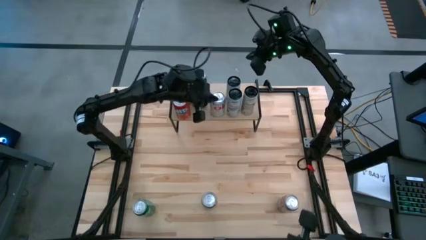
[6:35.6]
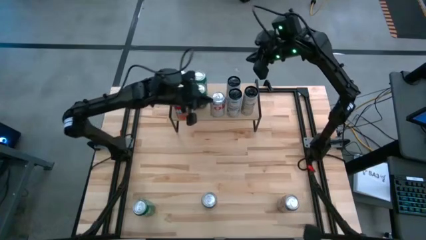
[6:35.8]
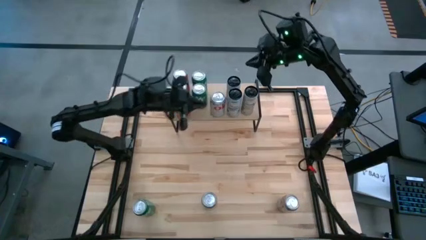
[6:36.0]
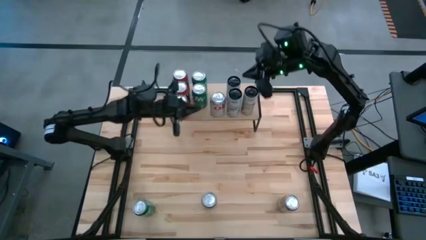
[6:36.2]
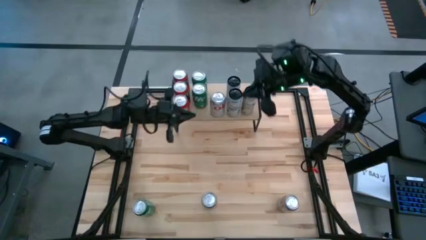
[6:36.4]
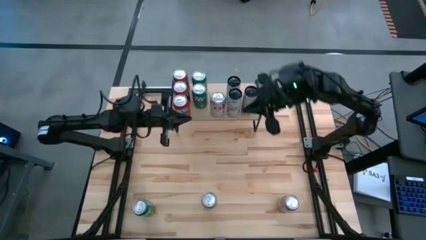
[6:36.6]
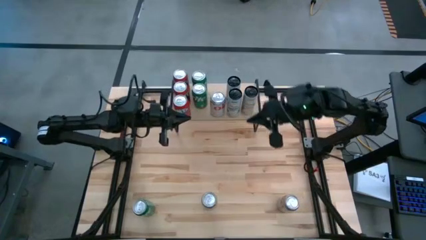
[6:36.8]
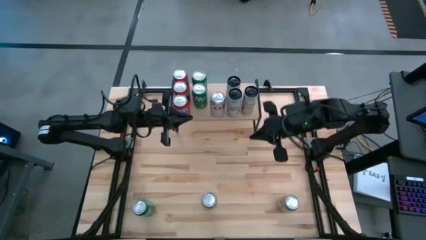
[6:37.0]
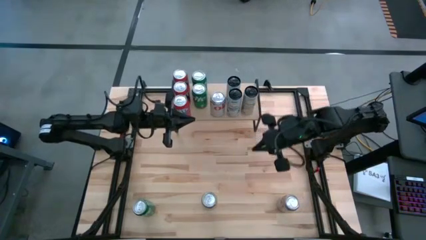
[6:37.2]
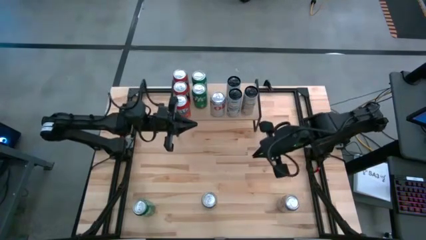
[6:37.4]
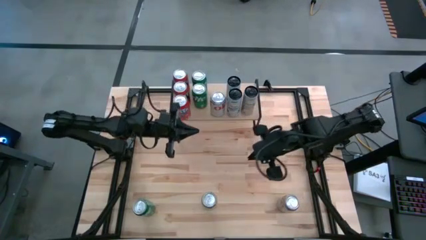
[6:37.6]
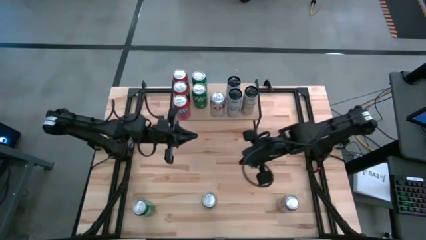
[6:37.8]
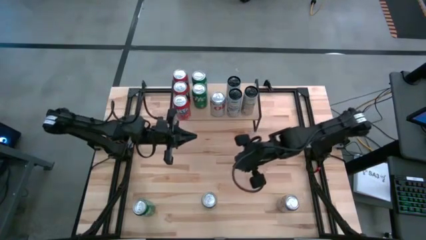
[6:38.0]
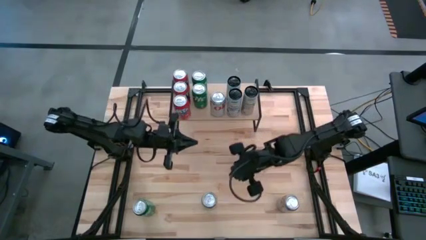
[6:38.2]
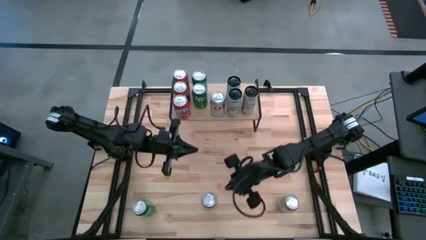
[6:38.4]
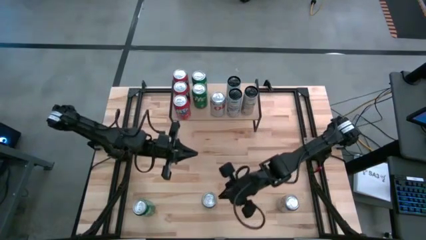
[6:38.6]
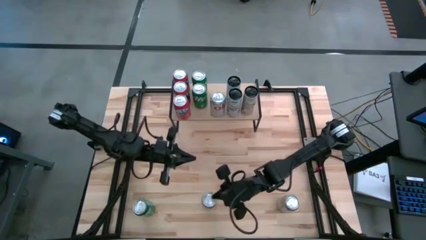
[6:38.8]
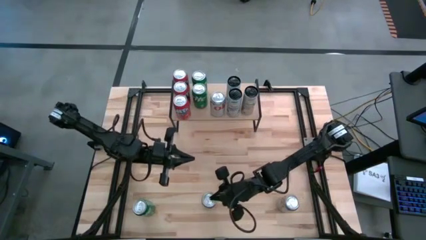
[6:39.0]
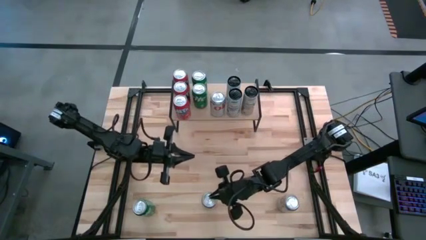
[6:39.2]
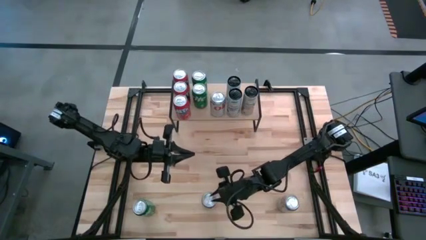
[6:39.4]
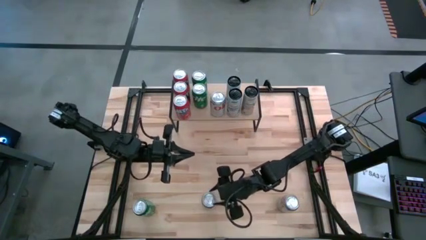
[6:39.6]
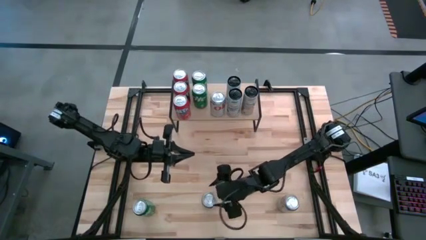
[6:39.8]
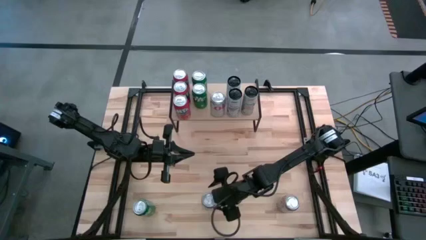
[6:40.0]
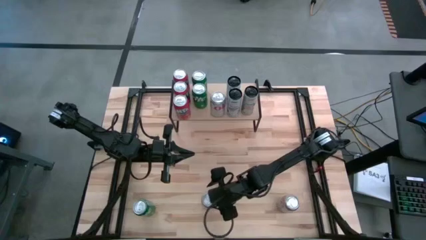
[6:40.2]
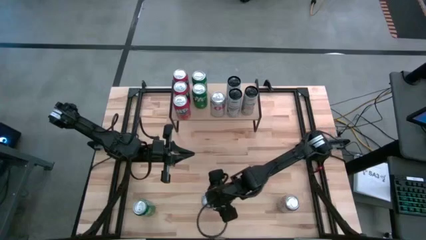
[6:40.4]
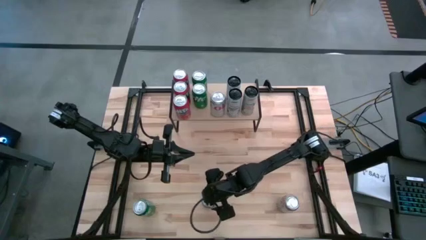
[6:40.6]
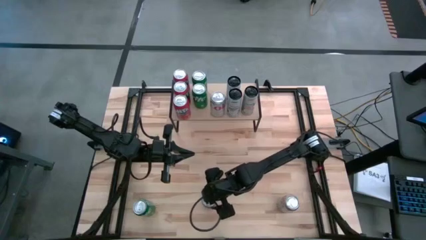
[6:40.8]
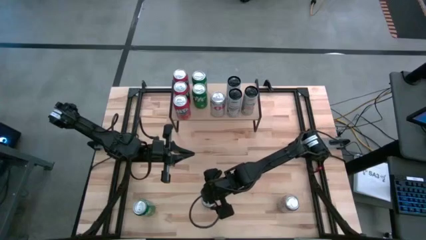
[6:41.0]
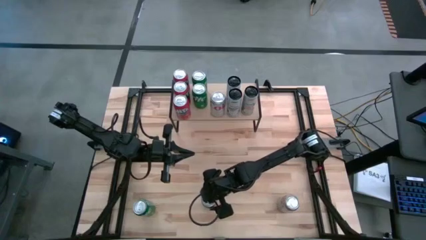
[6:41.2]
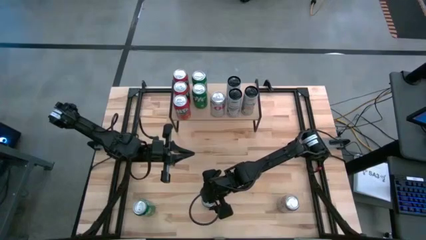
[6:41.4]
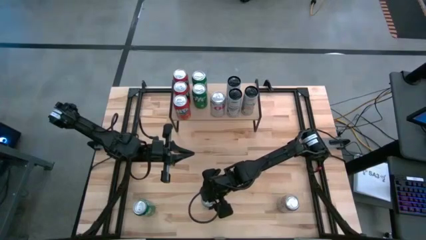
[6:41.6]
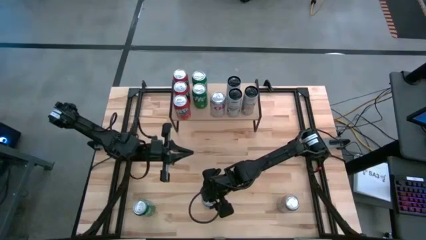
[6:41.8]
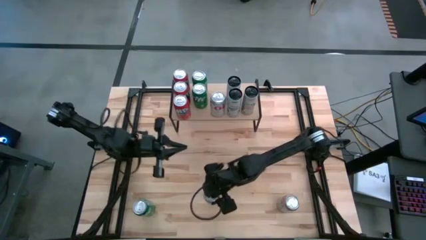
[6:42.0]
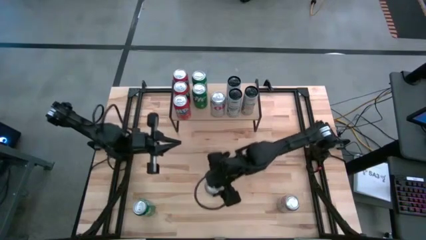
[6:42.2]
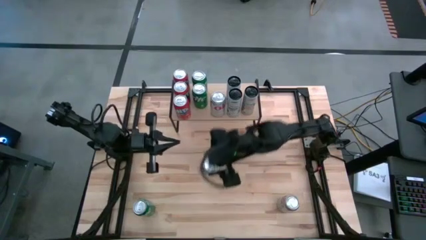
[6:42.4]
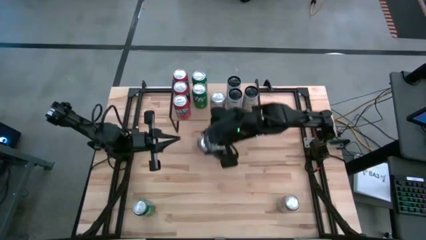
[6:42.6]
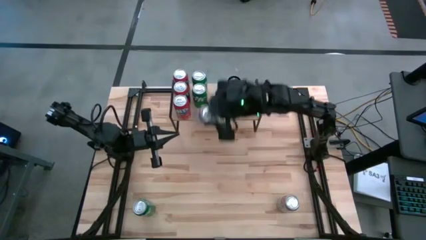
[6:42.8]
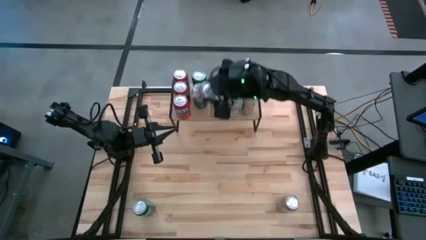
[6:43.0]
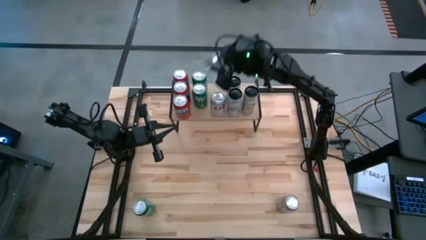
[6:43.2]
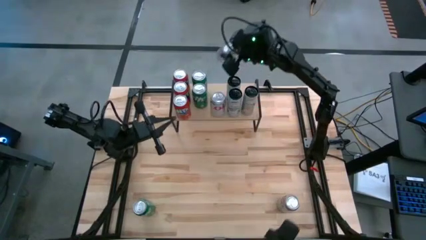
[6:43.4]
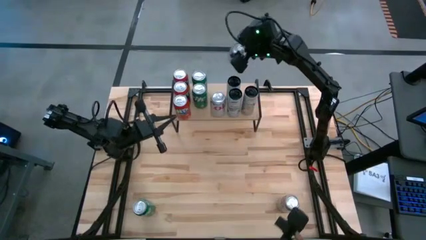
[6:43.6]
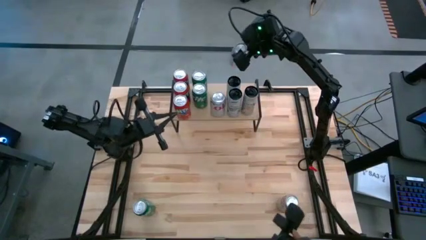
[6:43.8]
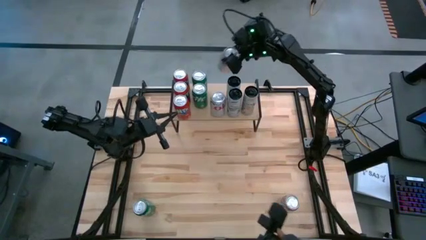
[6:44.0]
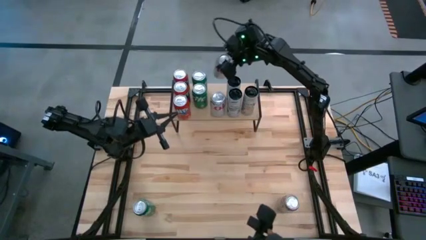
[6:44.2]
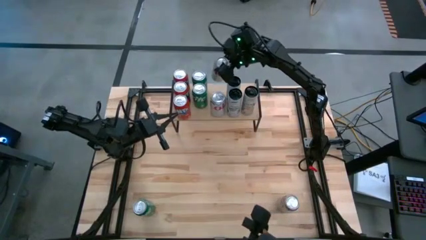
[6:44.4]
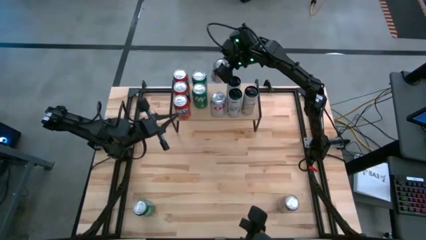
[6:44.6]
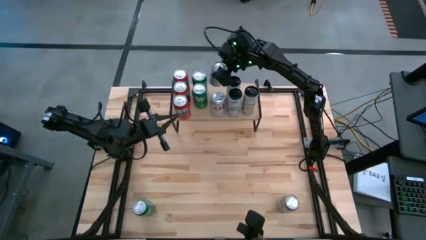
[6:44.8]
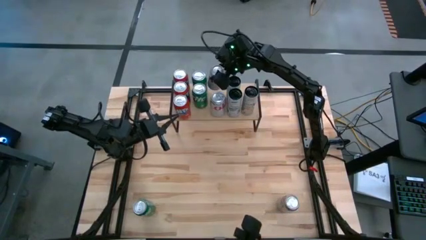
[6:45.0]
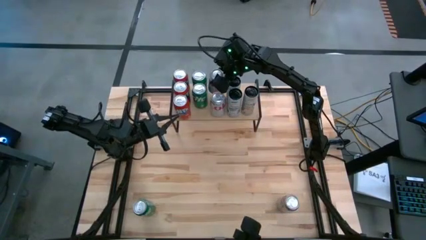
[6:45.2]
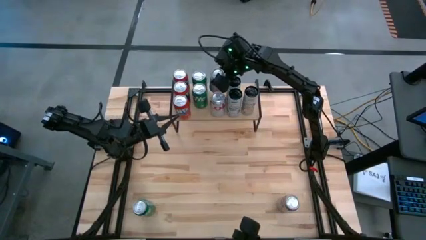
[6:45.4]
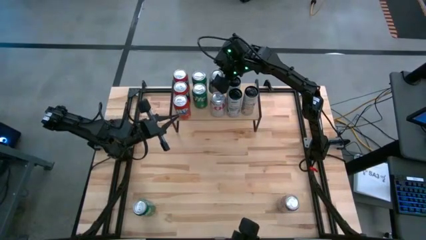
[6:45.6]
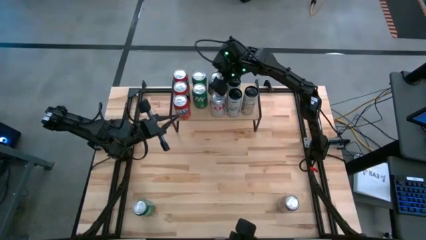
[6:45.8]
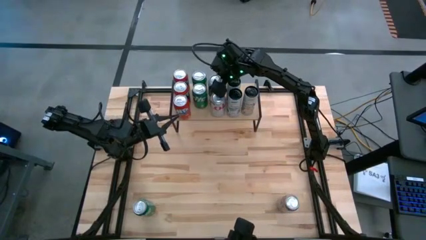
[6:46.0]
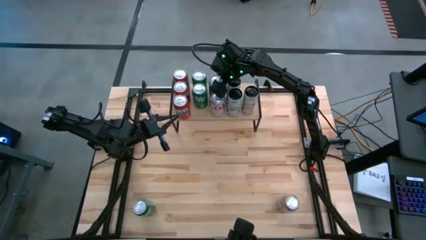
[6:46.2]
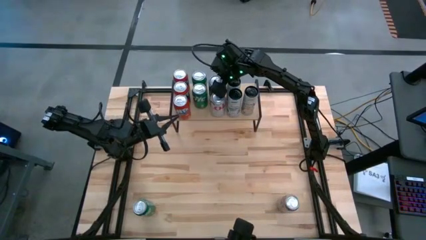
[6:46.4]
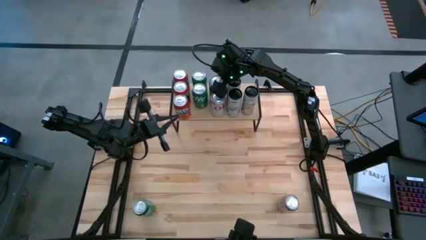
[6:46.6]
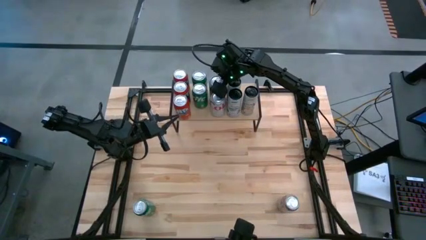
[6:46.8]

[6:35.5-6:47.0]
Task: Place canned beverage on shelf
Put the left silver soda can on the shelf aligned with the other silver soda can

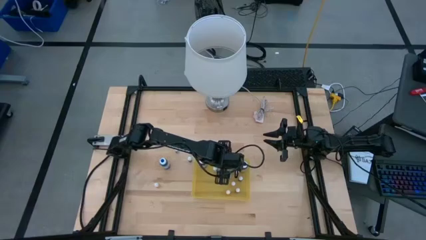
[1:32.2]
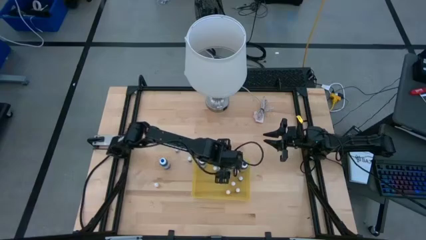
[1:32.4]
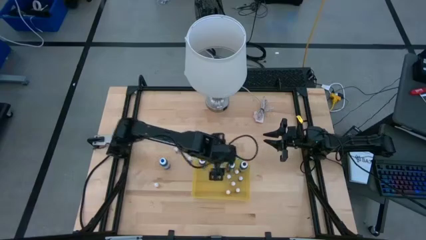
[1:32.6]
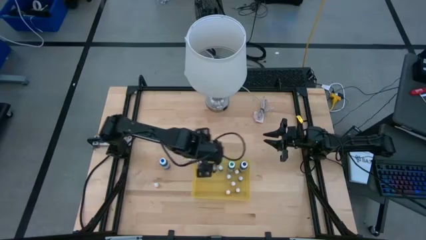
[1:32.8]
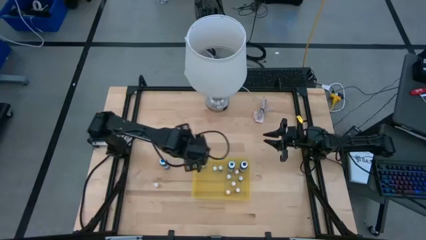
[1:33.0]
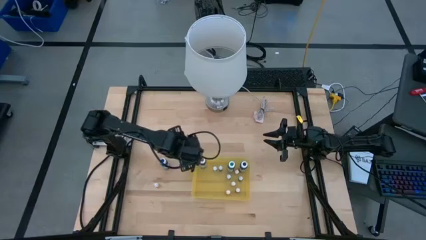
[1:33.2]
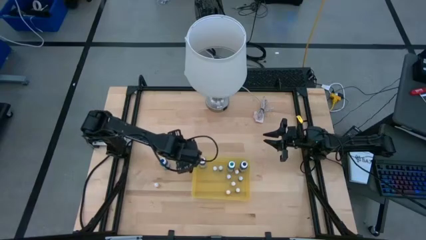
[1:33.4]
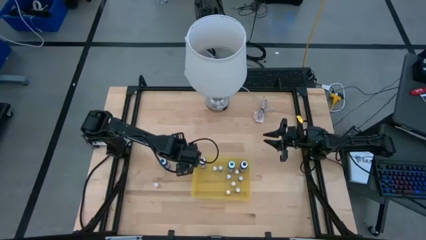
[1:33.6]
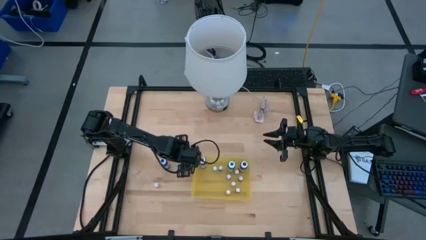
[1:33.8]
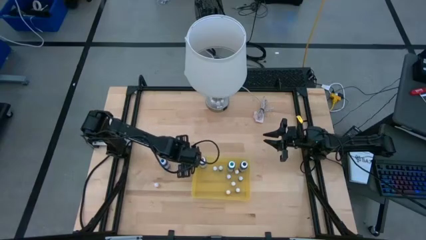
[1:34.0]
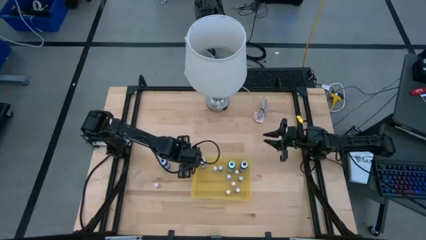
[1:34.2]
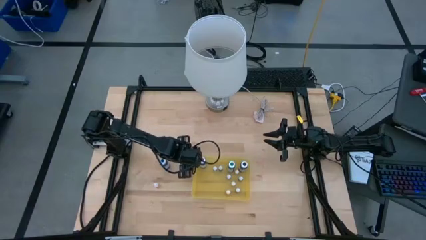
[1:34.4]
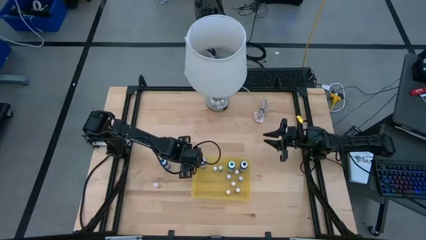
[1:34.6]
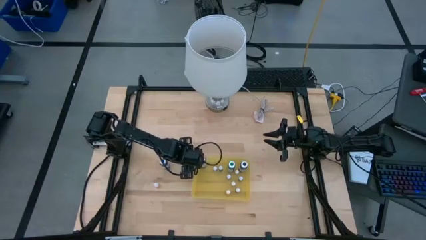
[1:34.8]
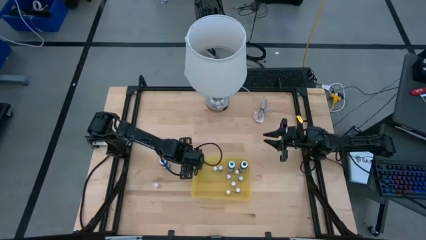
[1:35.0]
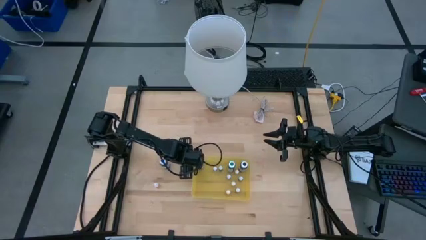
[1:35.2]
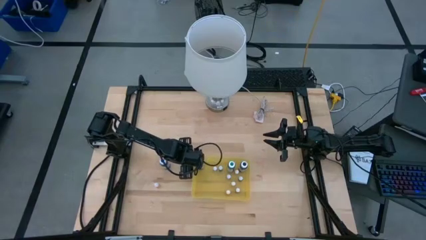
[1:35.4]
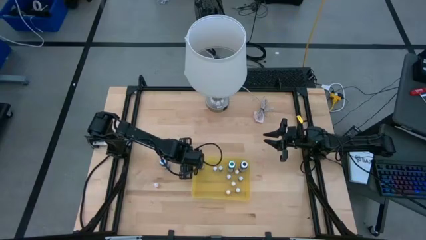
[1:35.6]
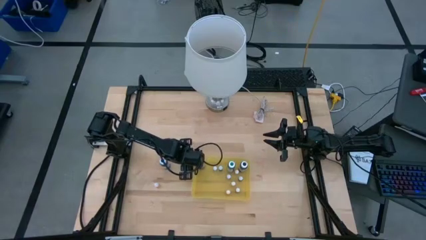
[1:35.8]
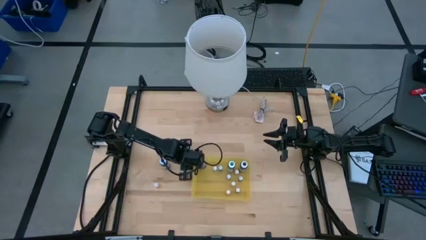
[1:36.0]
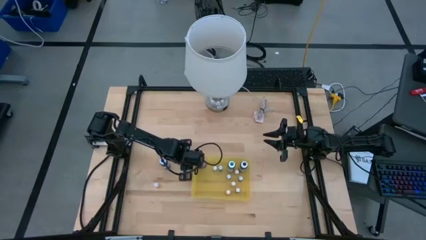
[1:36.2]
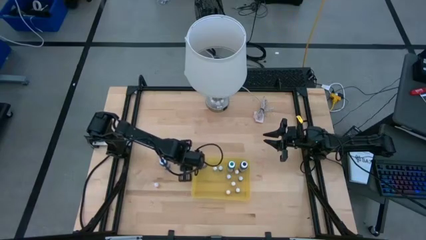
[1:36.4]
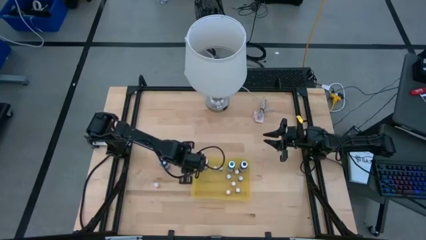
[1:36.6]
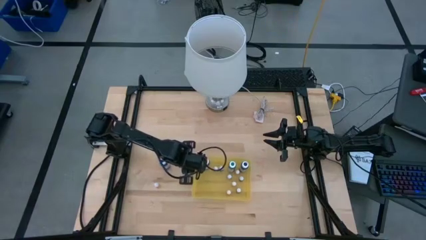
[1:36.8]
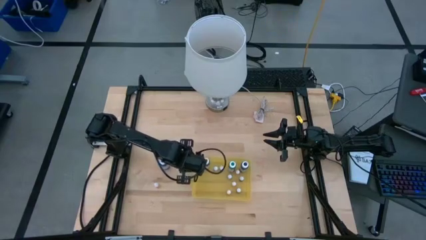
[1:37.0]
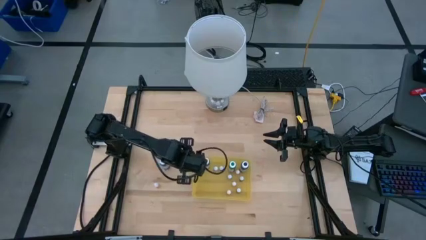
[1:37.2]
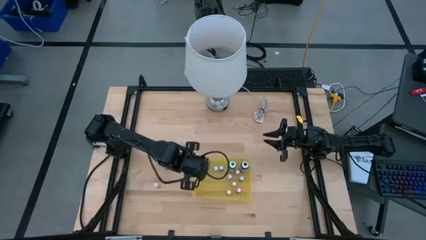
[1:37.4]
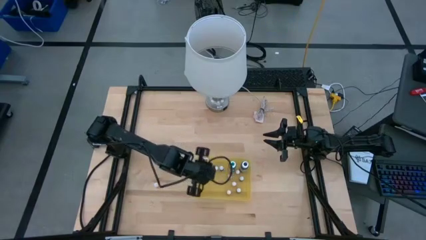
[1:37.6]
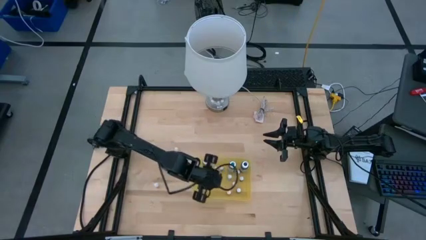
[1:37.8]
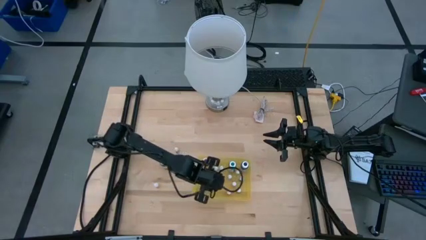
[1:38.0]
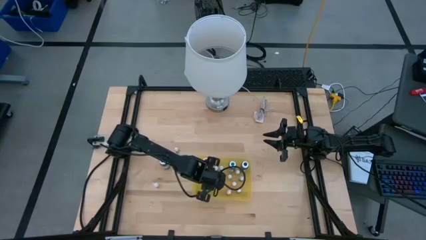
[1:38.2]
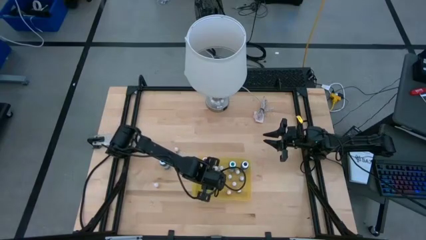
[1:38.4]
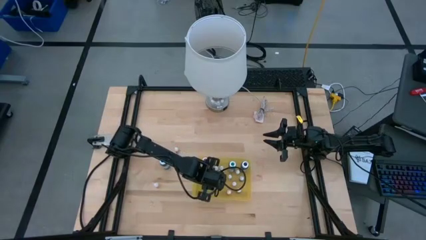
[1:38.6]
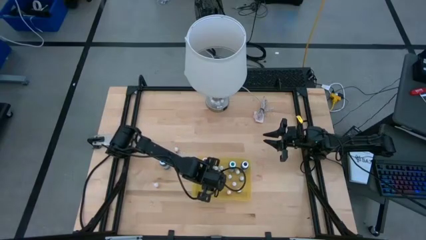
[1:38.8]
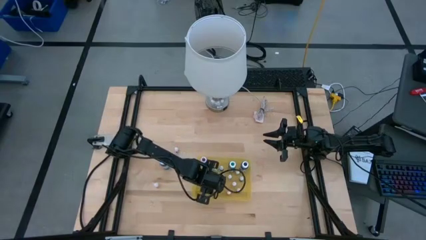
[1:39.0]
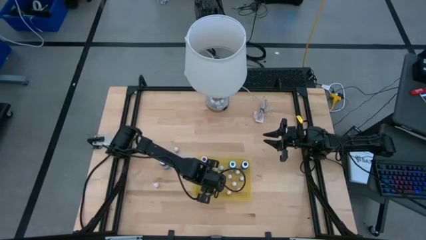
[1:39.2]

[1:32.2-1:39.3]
Task: Pick & Place food coloring
Put the small red food coloring bottle into the transparent bin
